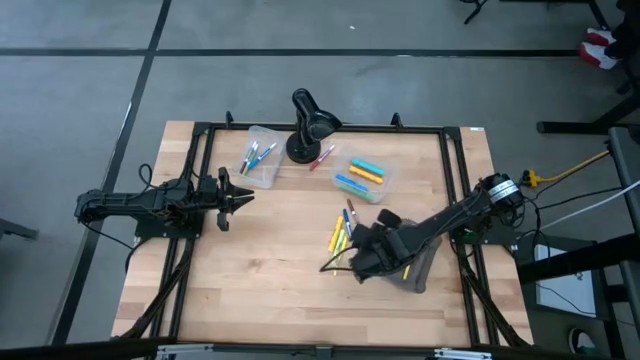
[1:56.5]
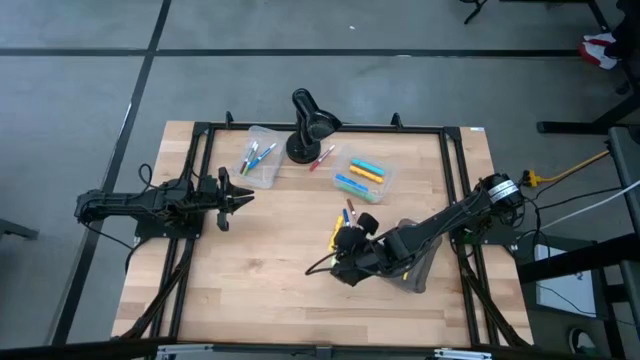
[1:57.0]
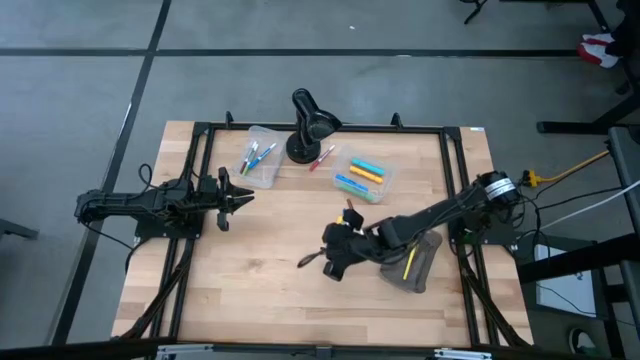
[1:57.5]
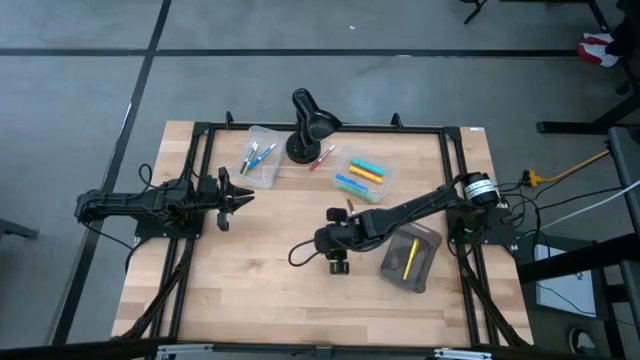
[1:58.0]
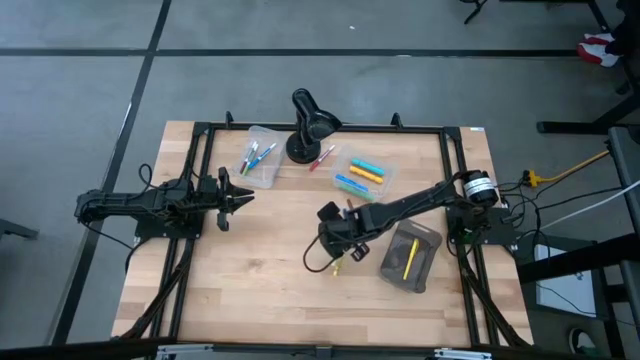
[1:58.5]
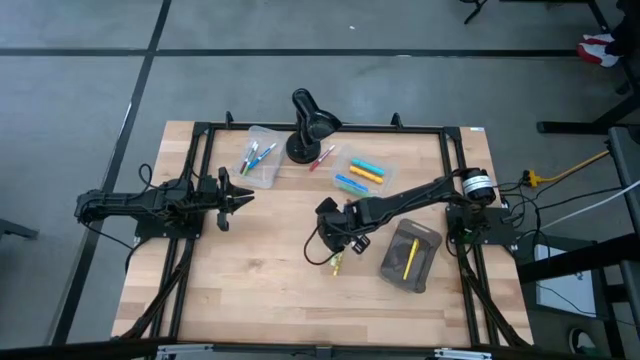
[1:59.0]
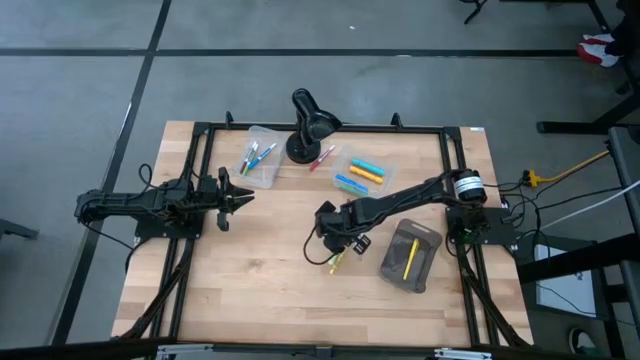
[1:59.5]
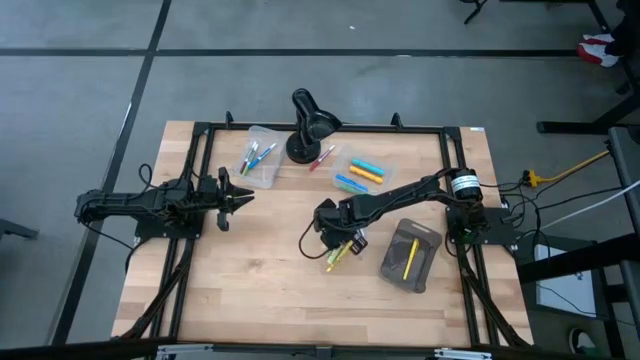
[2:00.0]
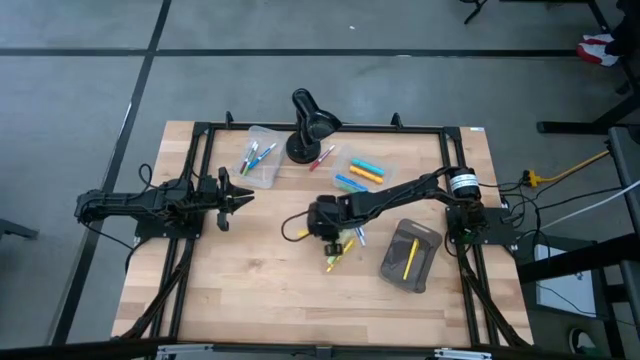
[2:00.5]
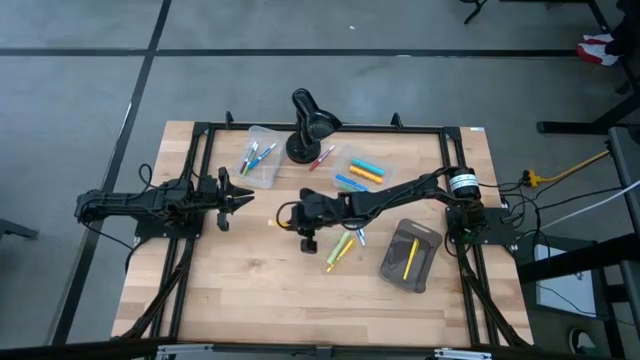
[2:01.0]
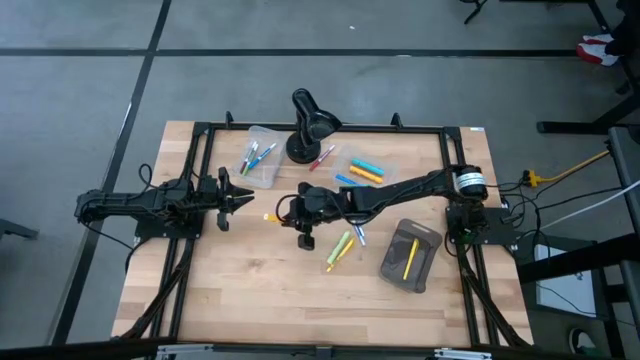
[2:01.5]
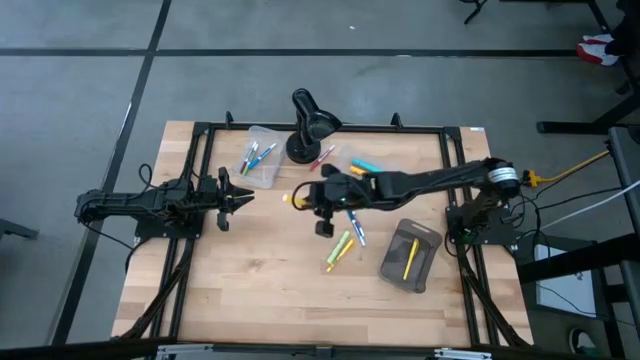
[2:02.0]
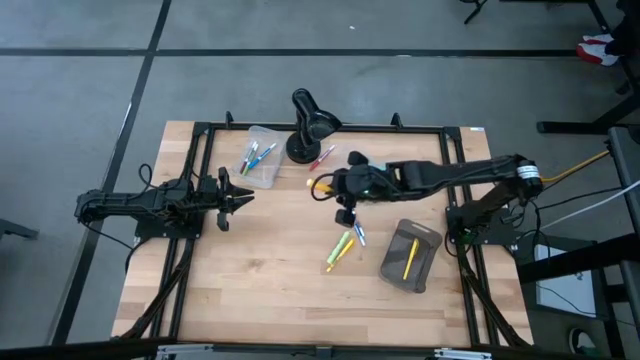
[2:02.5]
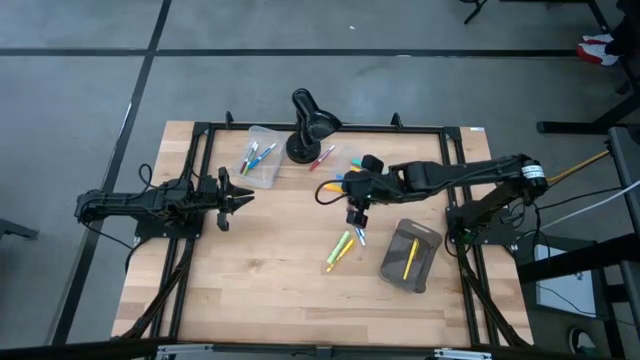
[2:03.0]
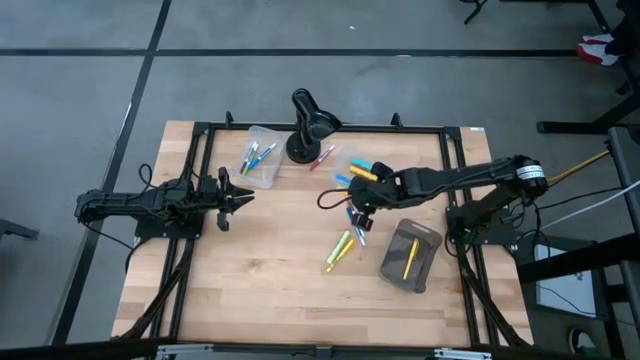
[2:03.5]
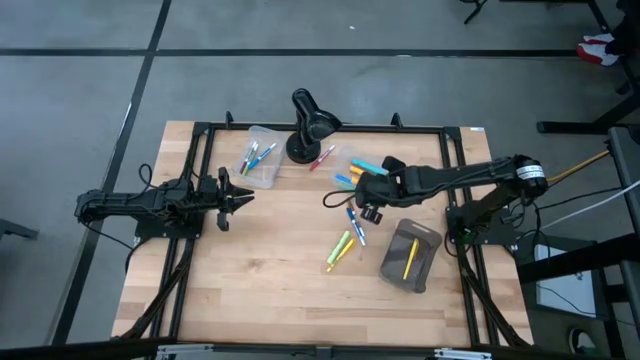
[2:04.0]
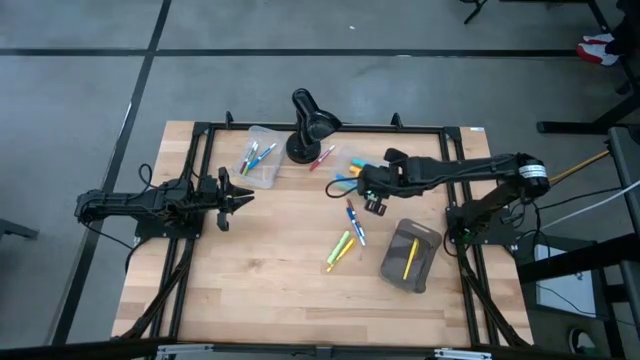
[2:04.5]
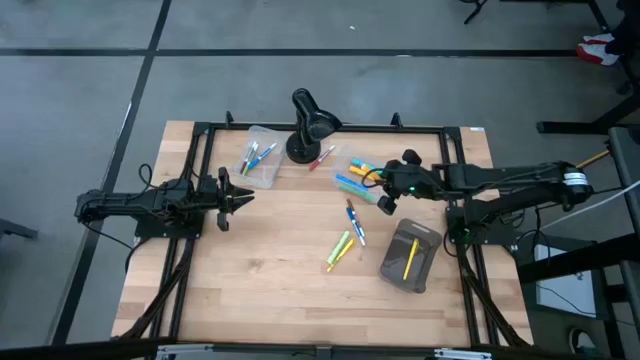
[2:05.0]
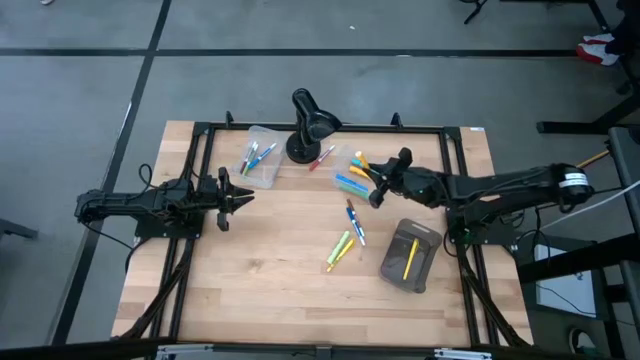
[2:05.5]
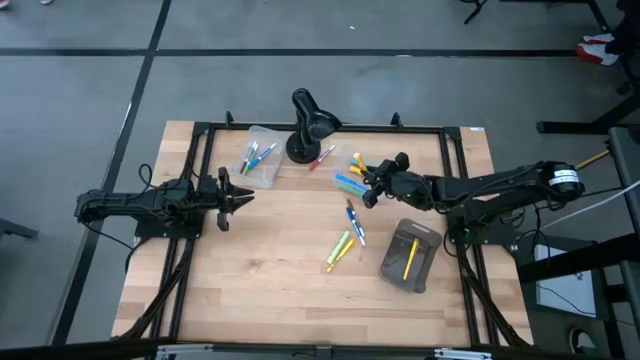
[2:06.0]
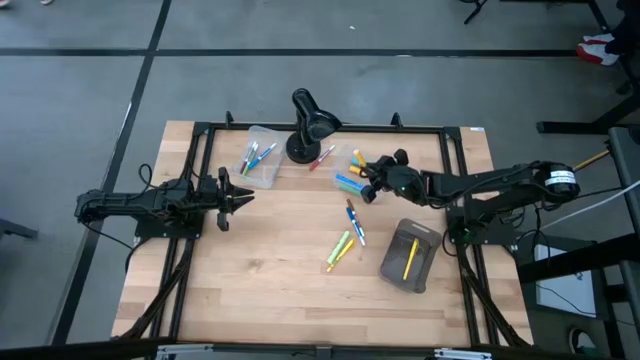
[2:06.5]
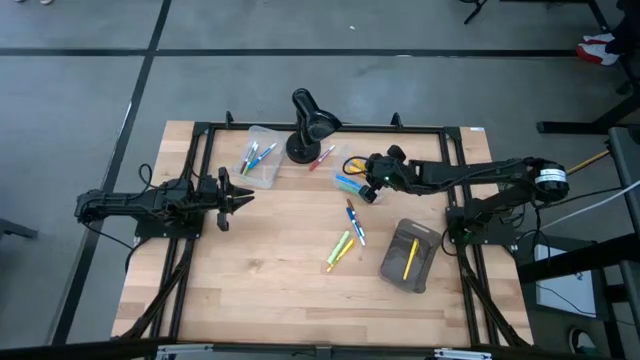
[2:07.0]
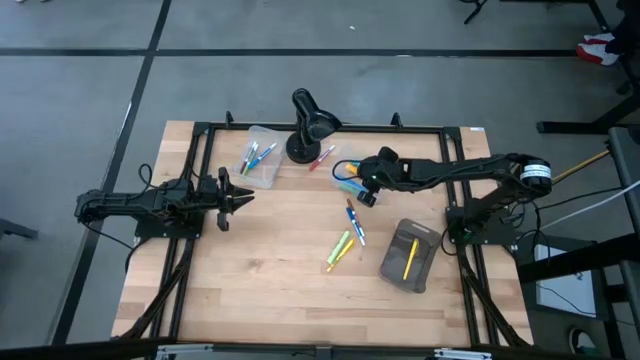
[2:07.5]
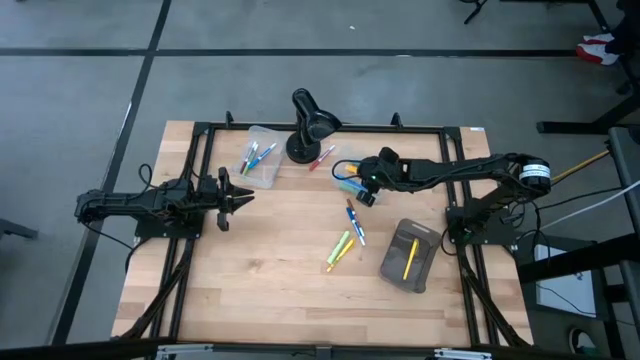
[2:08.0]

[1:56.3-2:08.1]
Task: Pick & Place Markers
Put the yellow highlighter pen into the right transparent bin

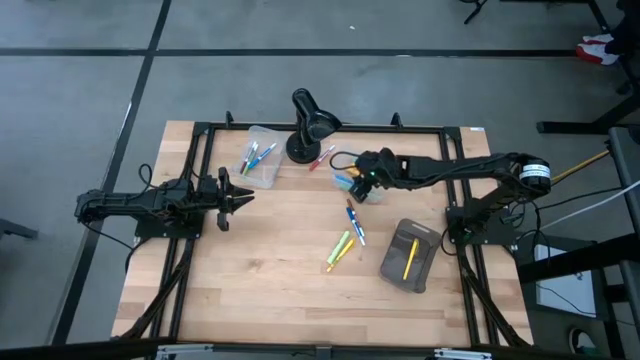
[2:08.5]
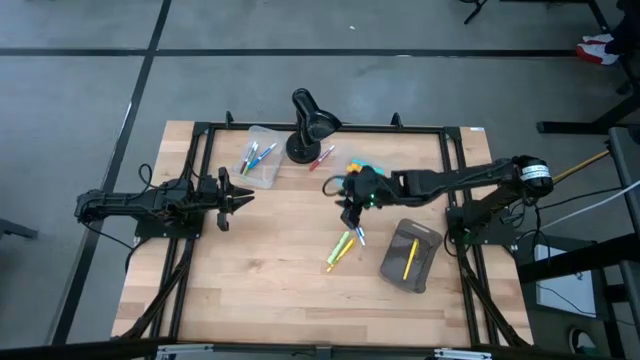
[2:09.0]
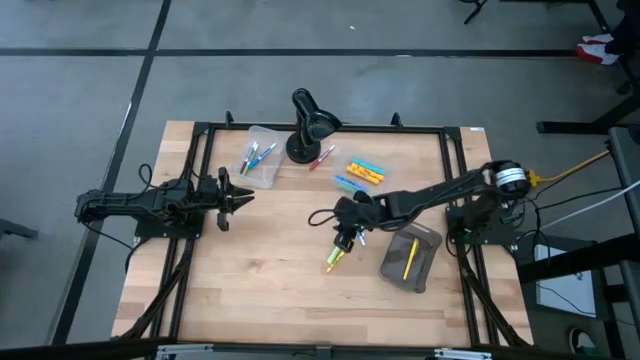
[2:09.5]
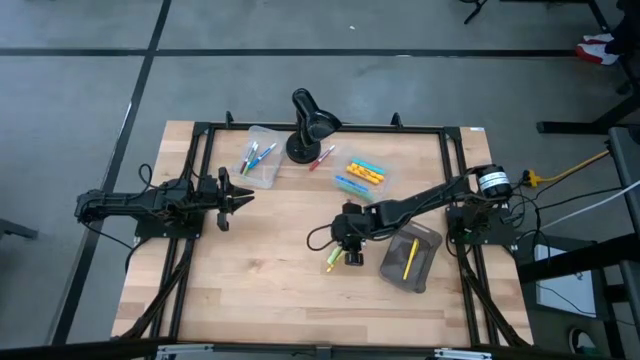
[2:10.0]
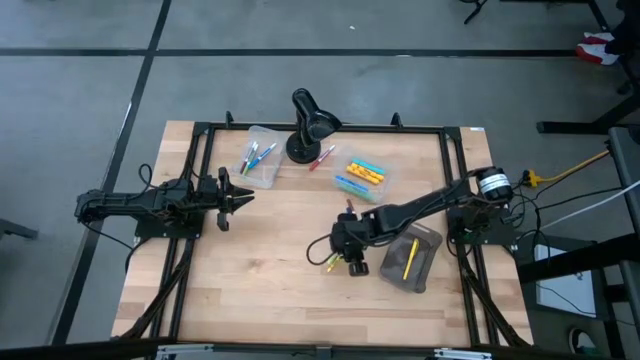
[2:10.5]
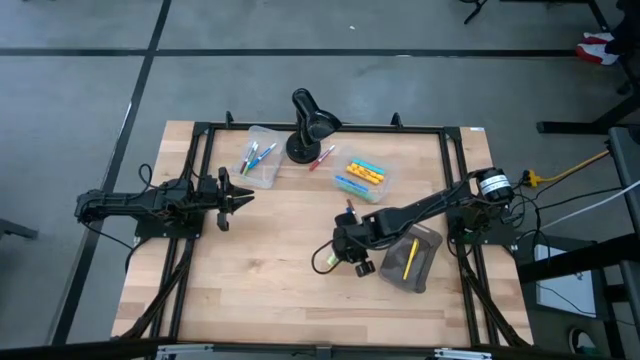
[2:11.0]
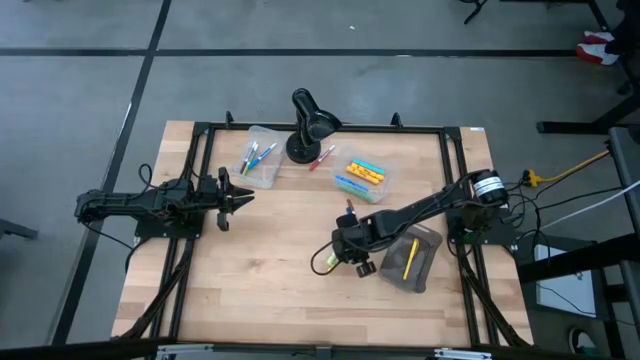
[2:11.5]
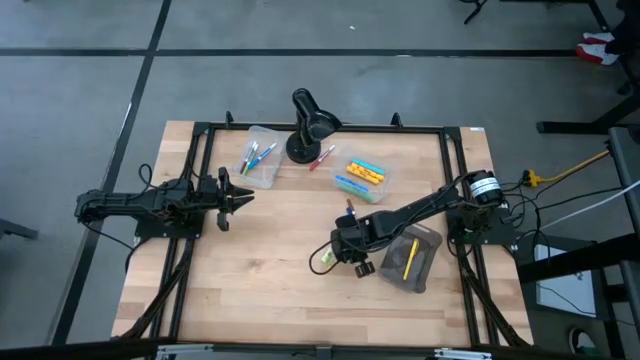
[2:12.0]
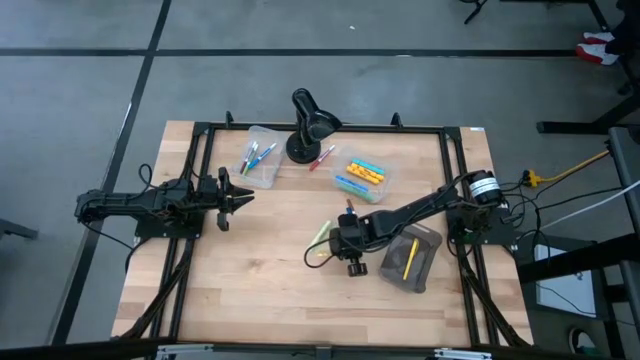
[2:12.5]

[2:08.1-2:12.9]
Put the yellow pen into the black bin

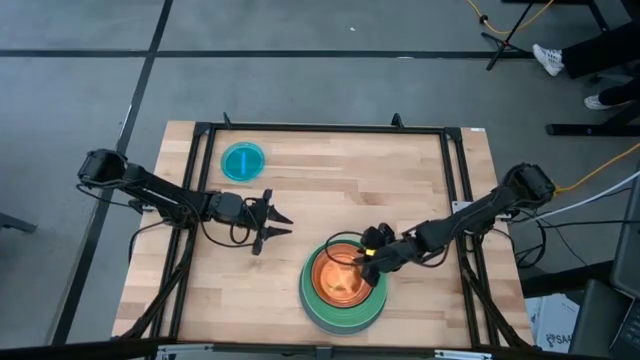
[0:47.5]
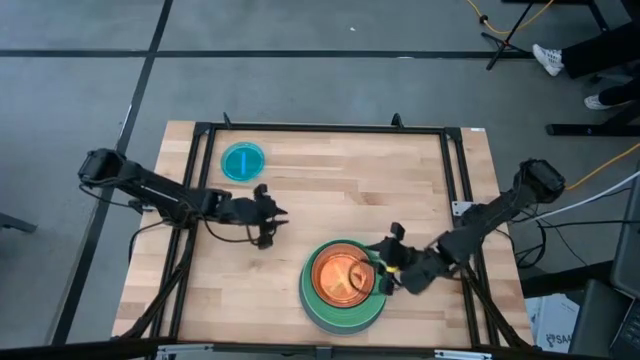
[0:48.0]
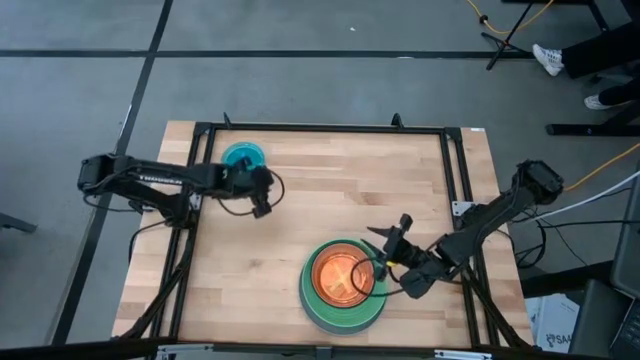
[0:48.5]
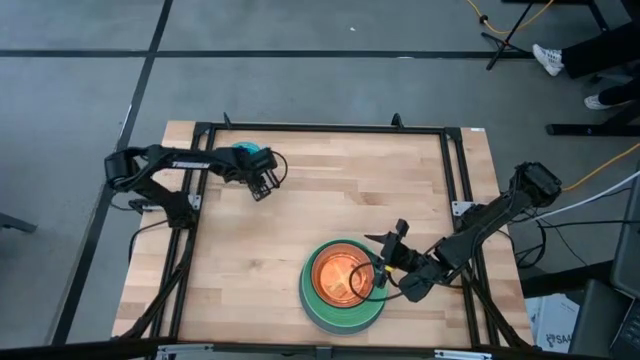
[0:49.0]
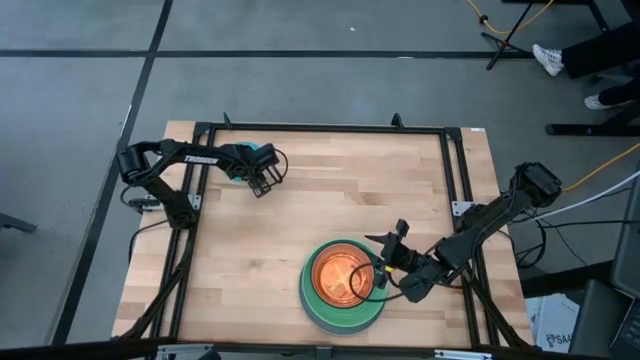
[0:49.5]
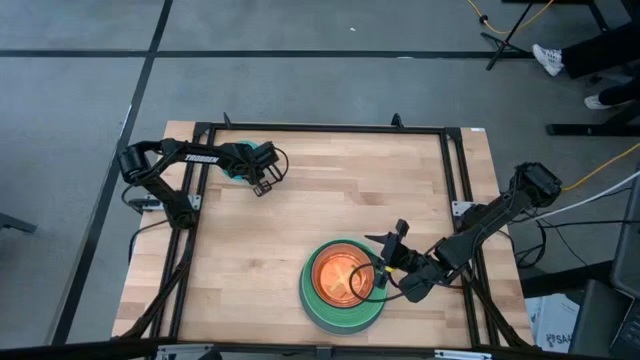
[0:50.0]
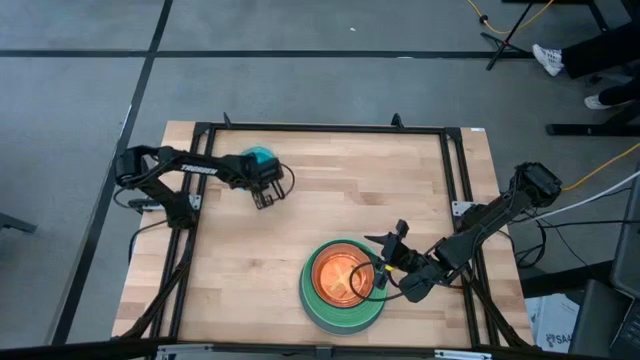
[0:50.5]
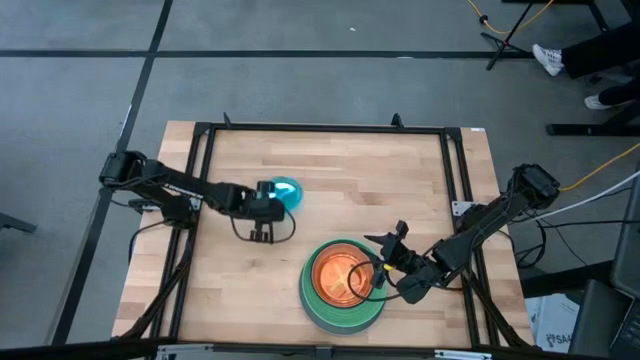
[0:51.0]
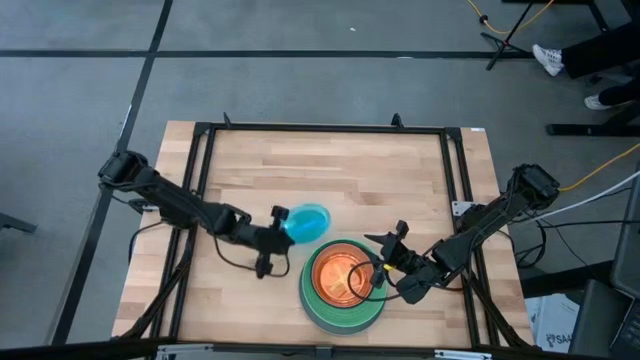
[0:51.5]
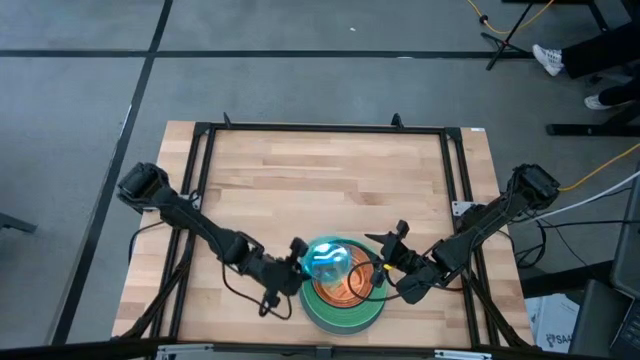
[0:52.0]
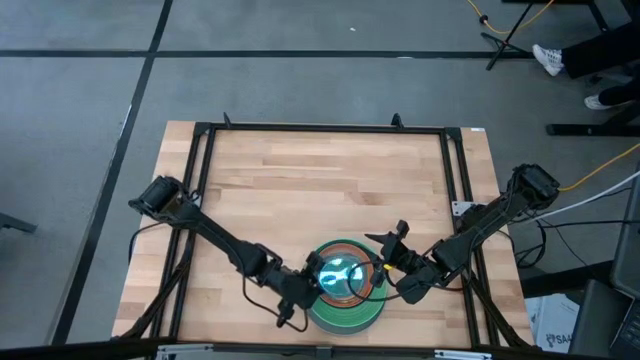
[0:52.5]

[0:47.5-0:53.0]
Task: Stack plastic plates
Stack the blue plate on top of the orange plate
